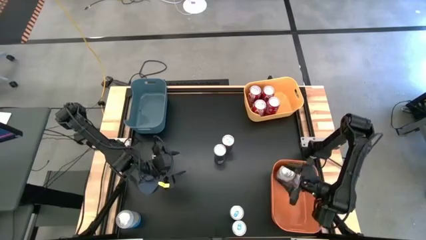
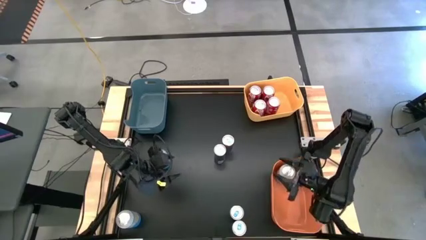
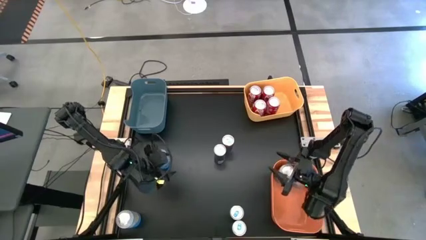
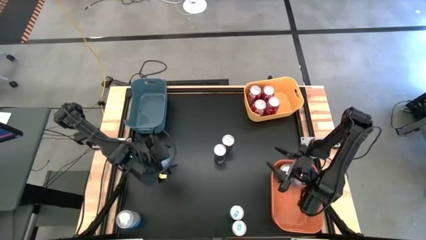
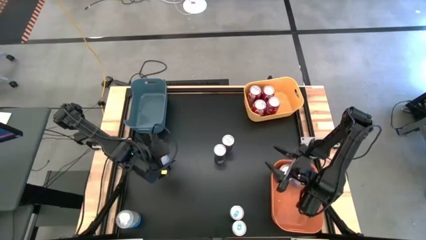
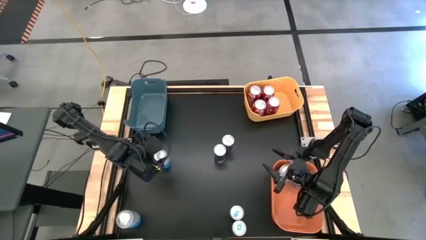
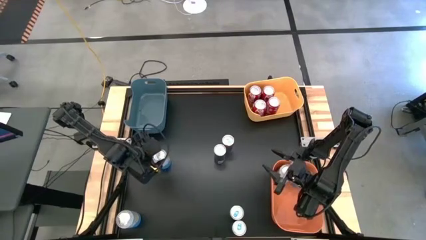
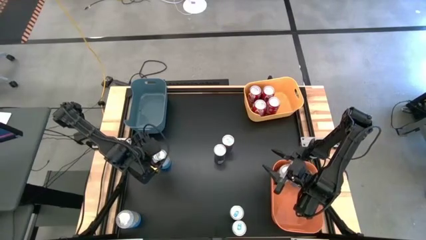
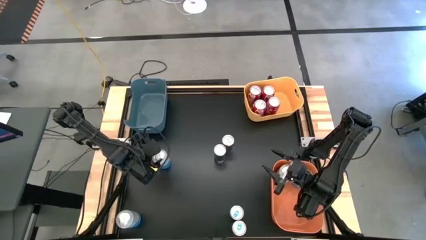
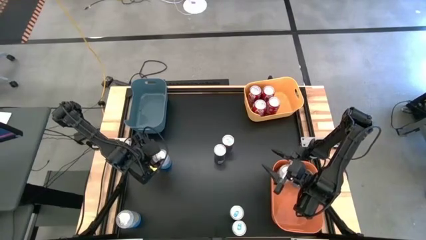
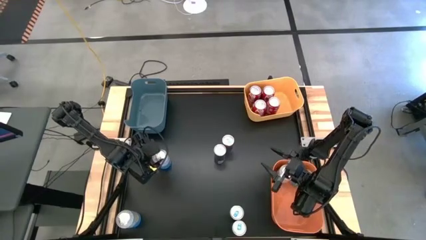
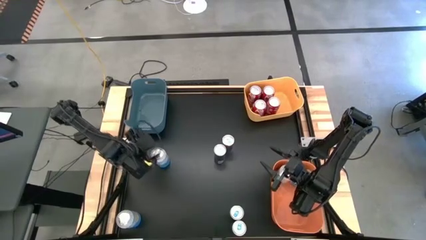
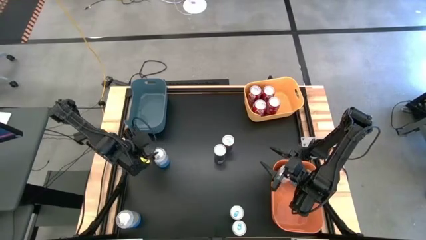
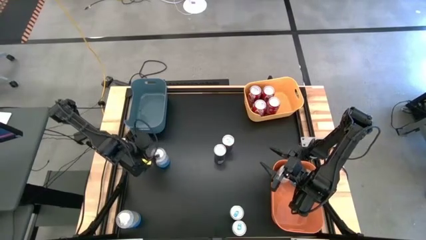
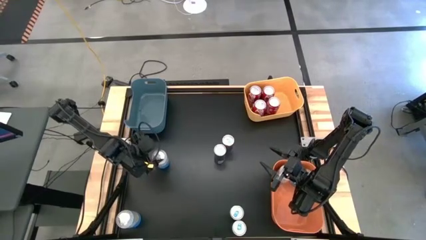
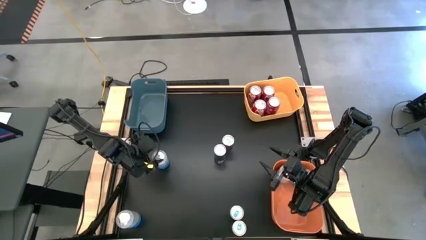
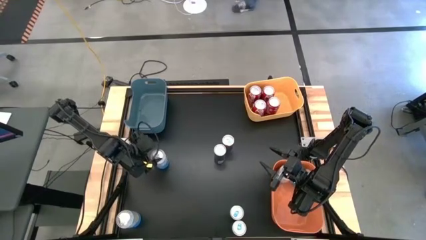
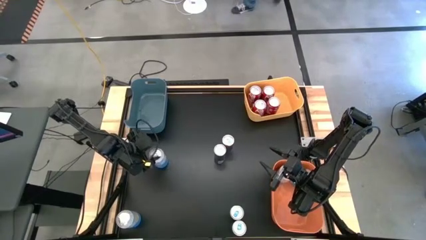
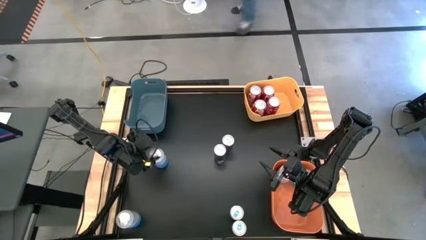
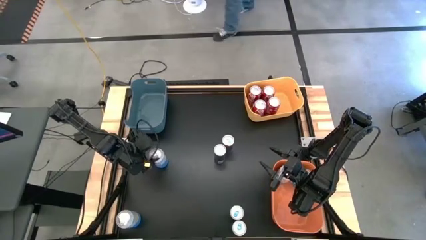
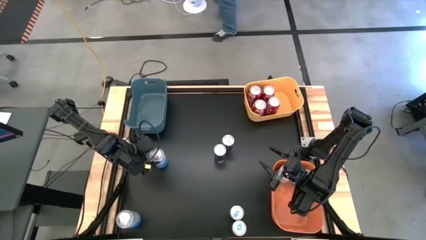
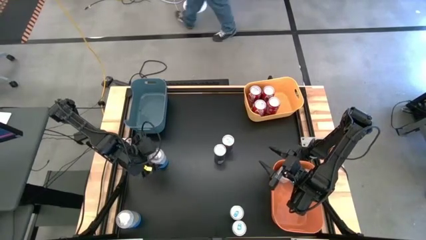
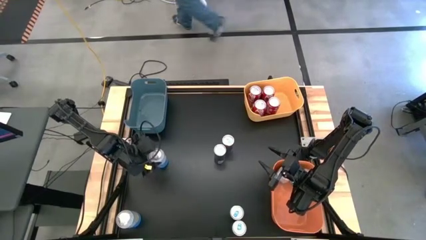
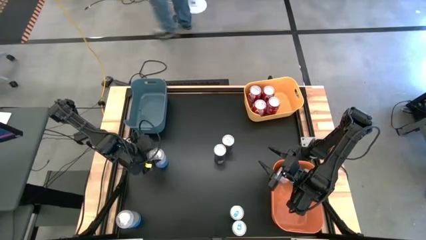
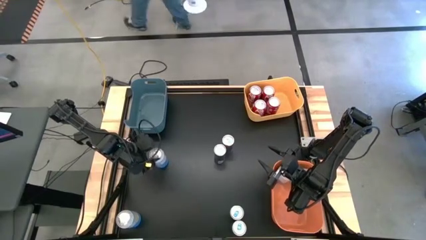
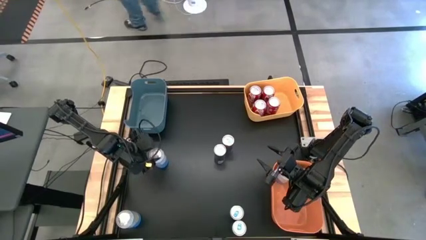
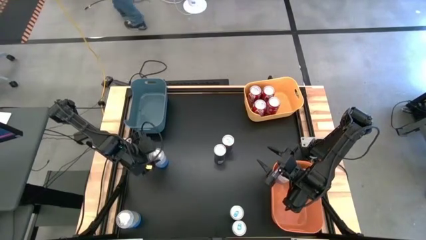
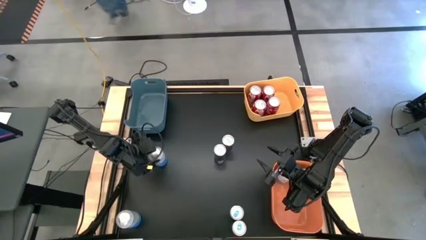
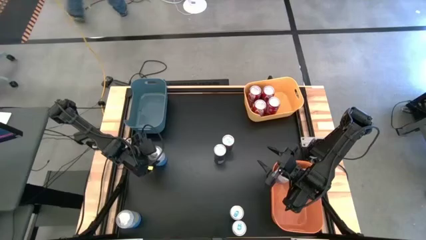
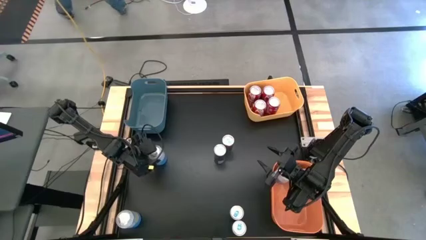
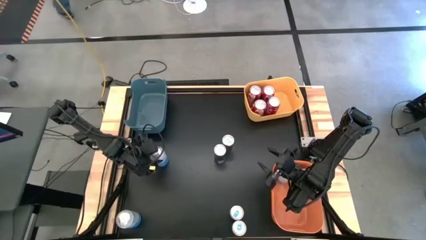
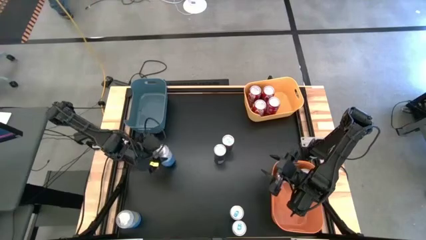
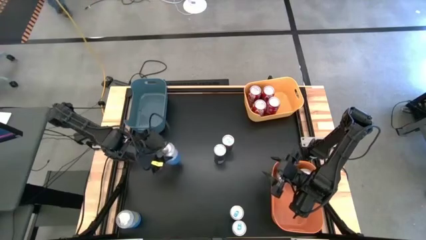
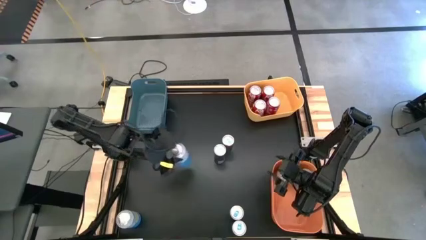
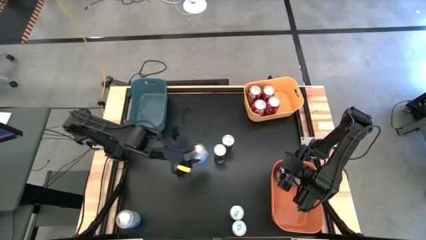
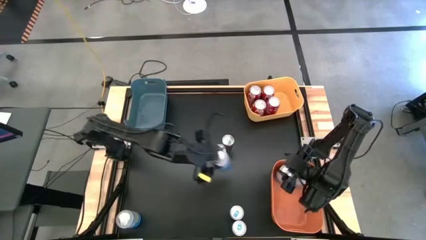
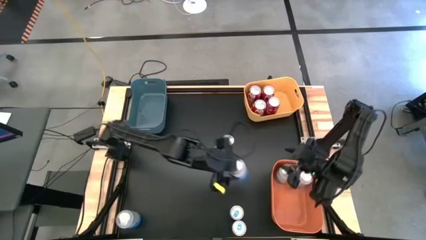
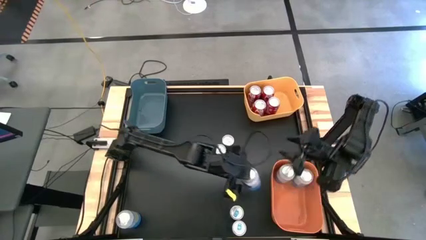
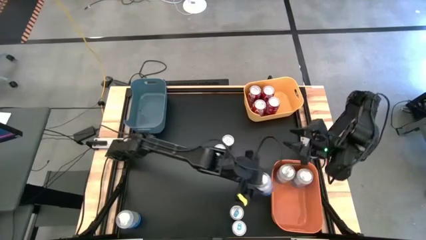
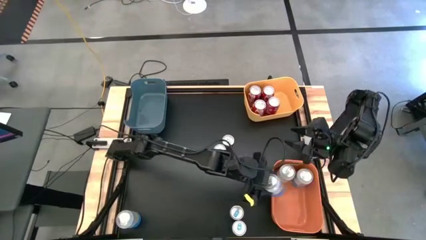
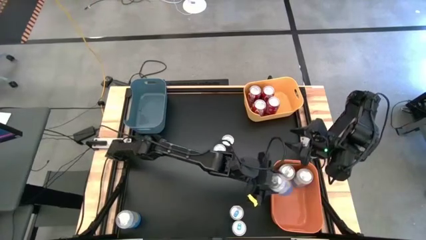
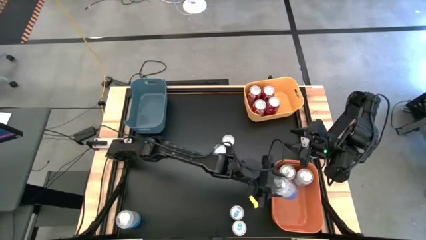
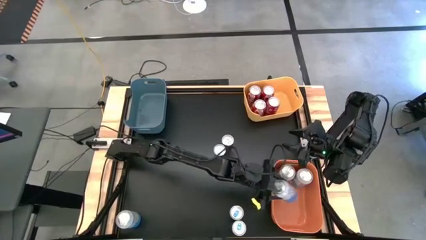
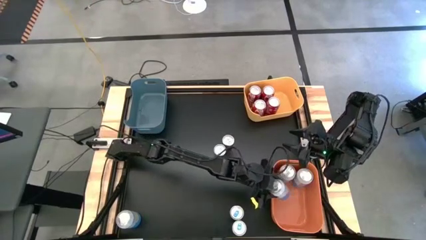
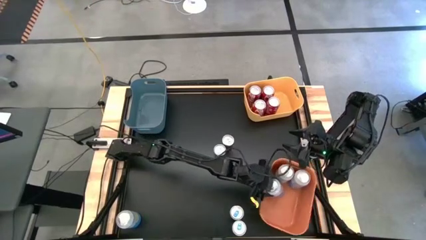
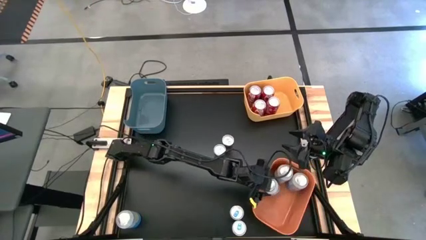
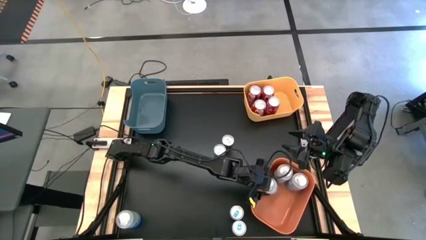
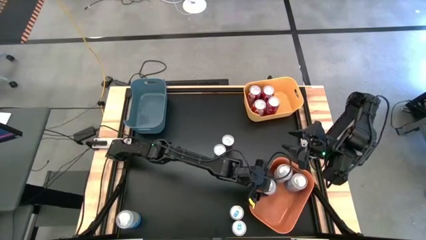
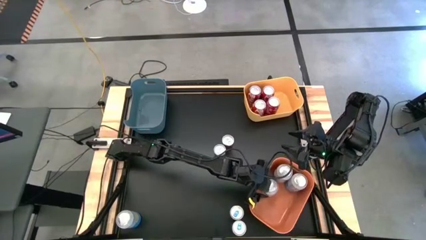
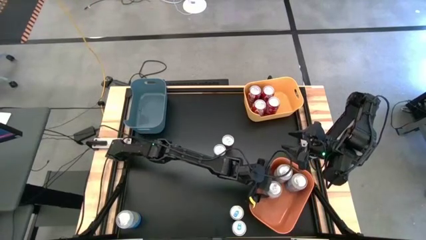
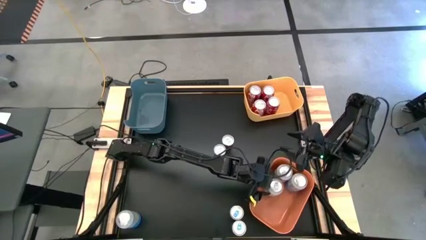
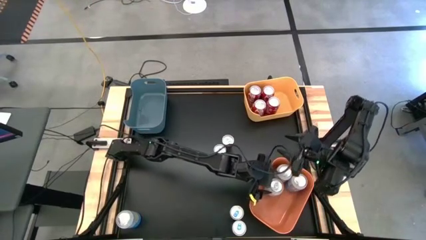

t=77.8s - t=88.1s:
Task: Sort soda cans
Put the top white soda can into the orange bin

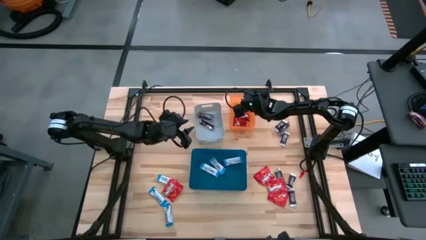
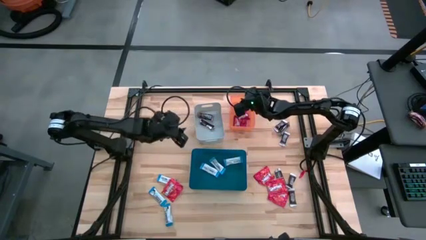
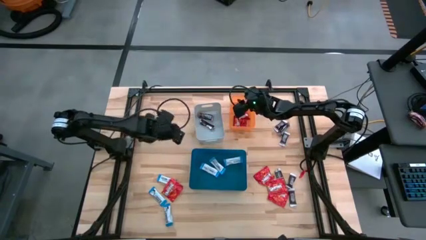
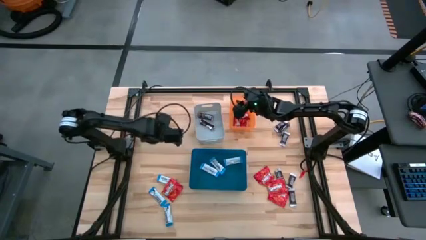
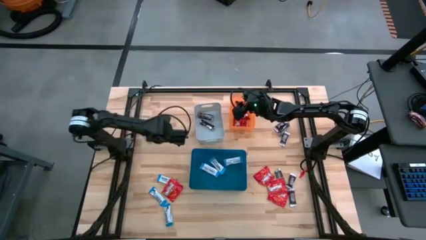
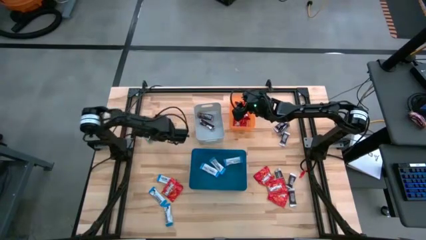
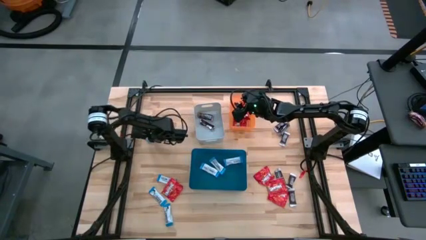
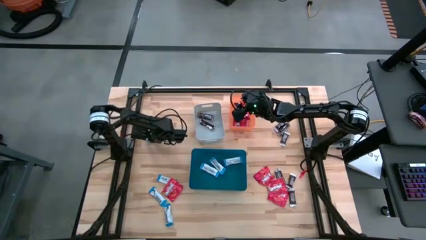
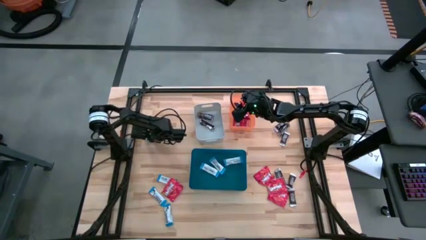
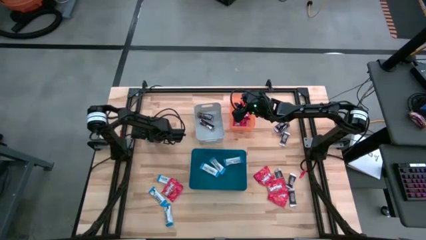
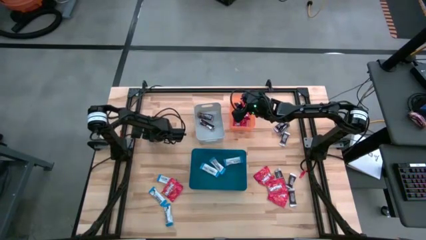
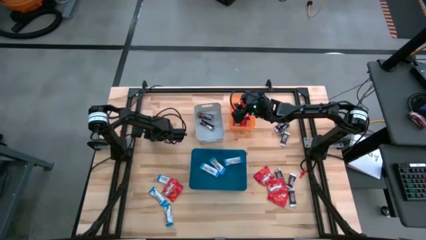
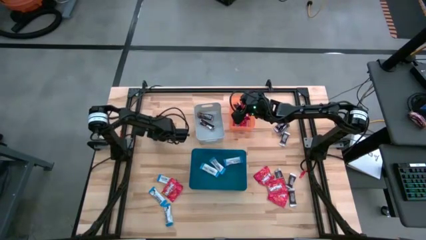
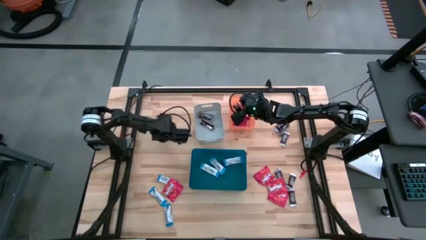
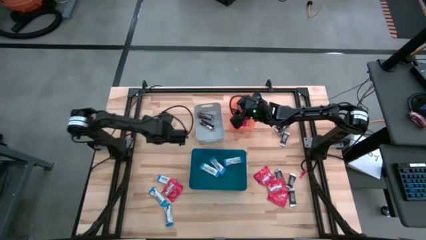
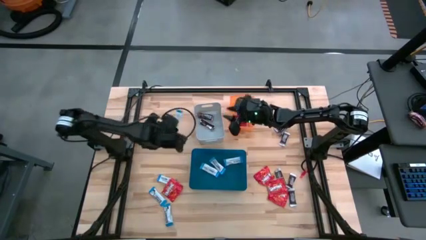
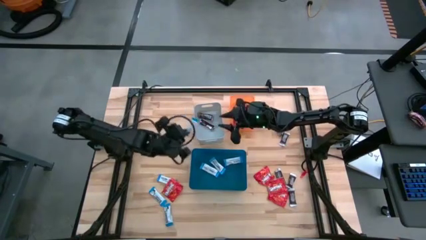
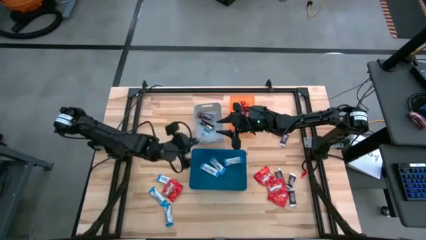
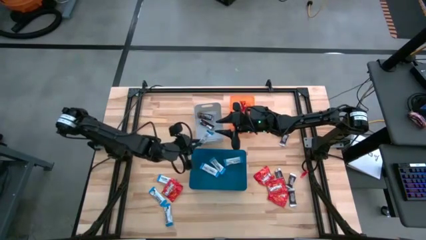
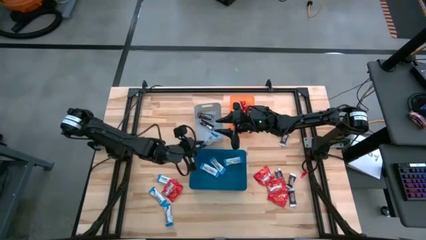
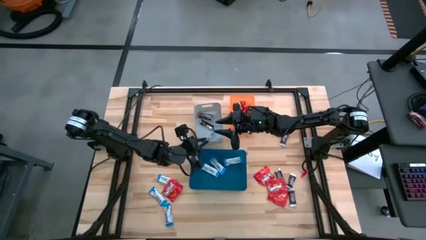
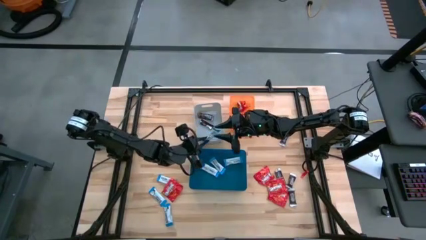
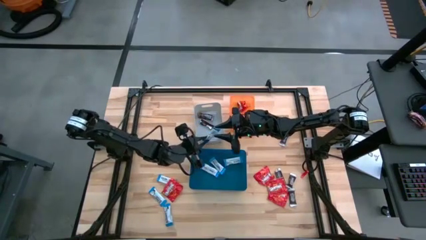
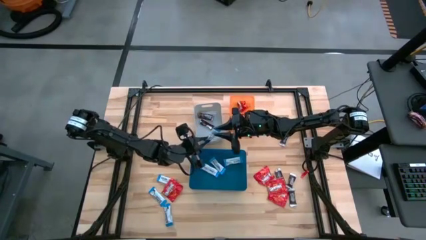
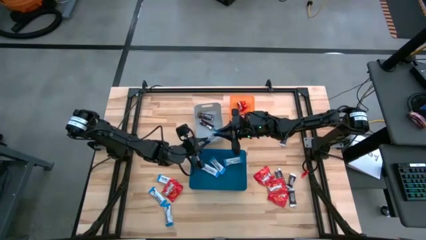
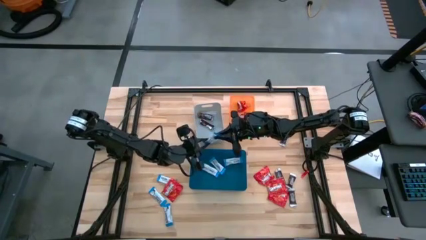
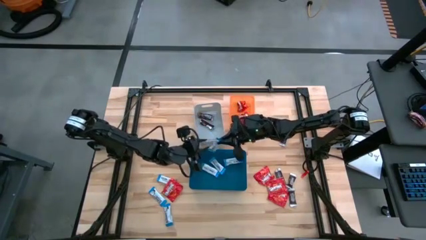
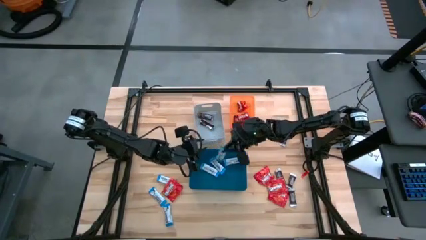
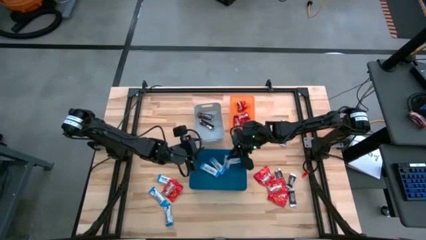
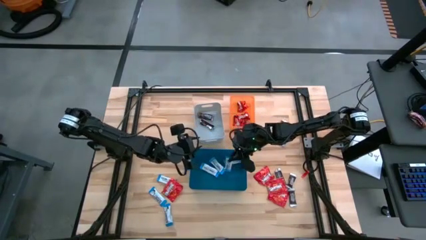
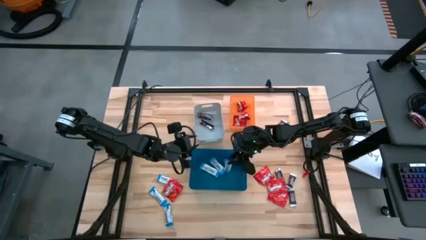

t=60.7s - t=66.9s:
Task: Sort candy
Put the white chocolate bar into the blue bin
